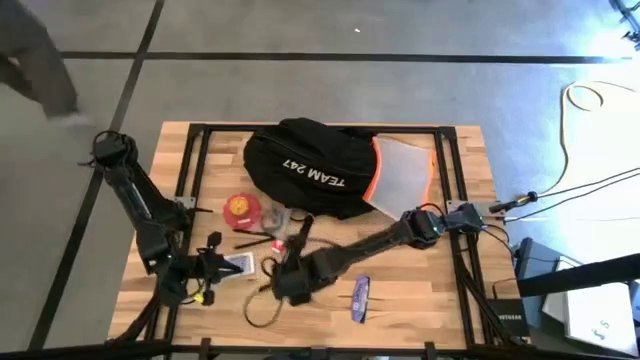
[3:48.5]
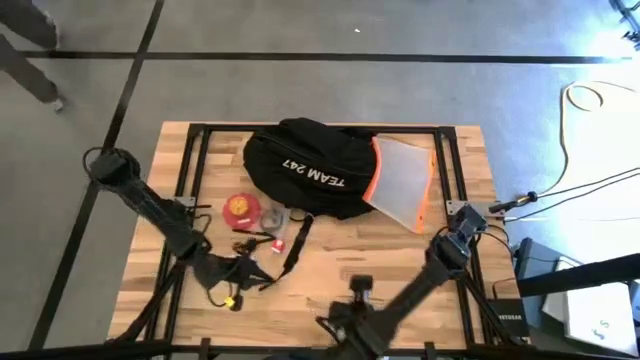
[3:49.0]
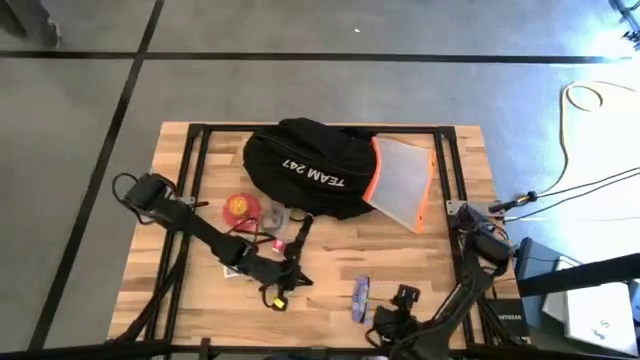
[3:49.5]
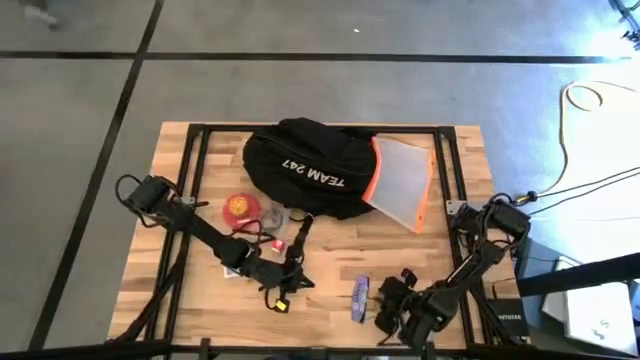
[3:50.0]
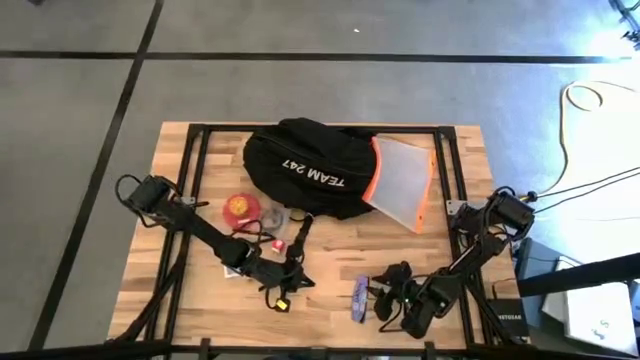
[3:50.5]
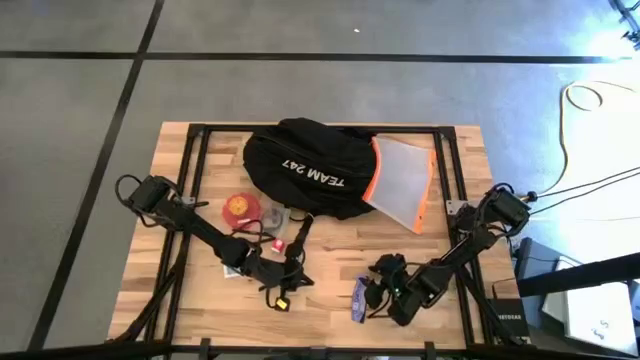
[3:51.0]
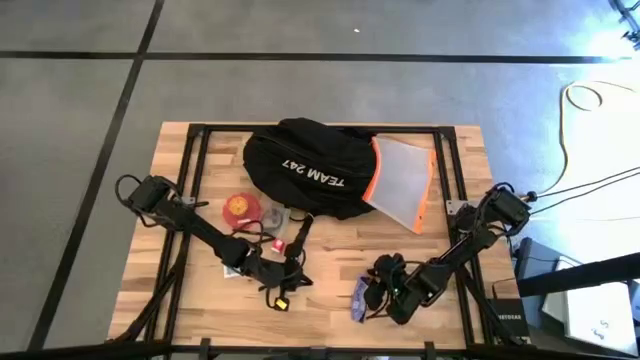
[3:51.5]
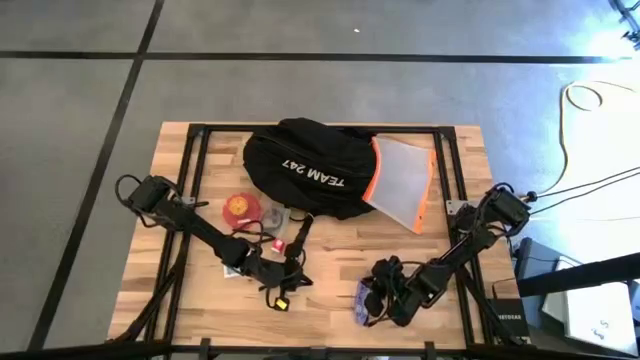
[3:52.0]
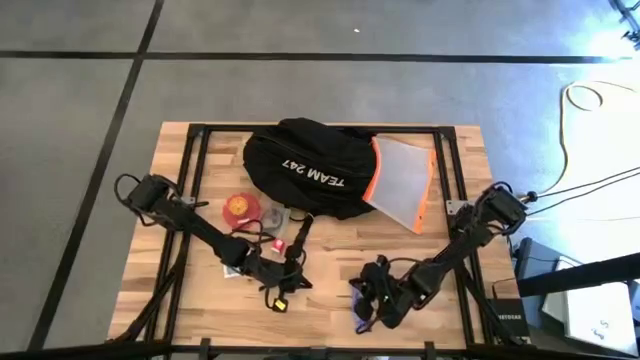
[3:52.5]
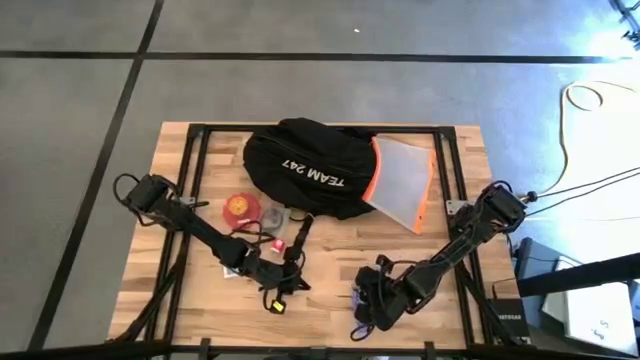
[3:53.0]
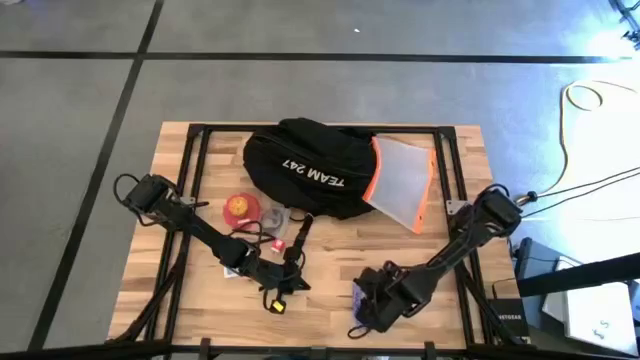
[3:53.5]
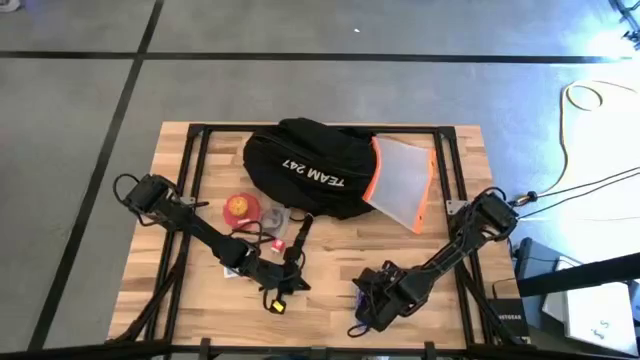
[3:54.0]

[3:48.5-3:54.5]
Task: Unpack backpack
Move the blue chocolate bar to the center of the table

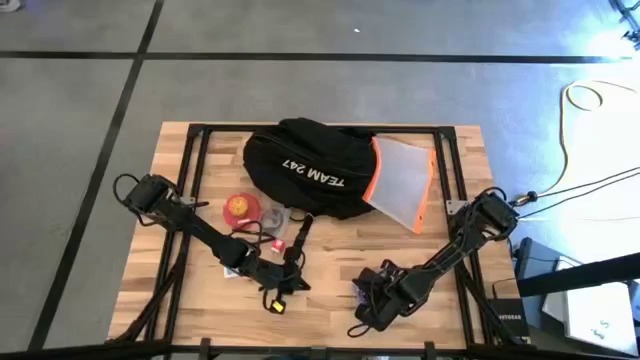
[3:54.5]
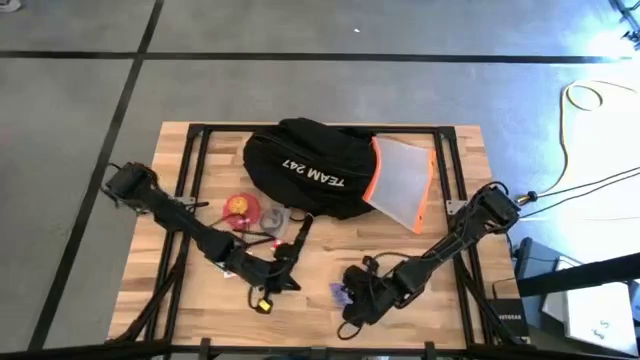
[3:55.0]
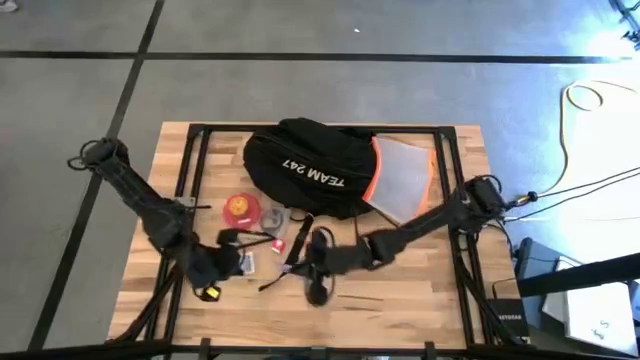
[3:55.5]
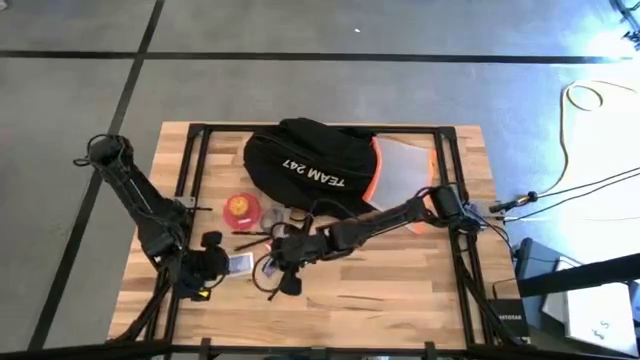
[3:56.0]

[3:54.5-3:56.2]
Move the blue chocolate bar to the center of the table

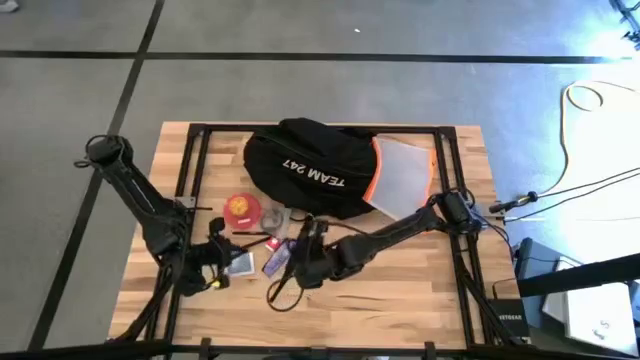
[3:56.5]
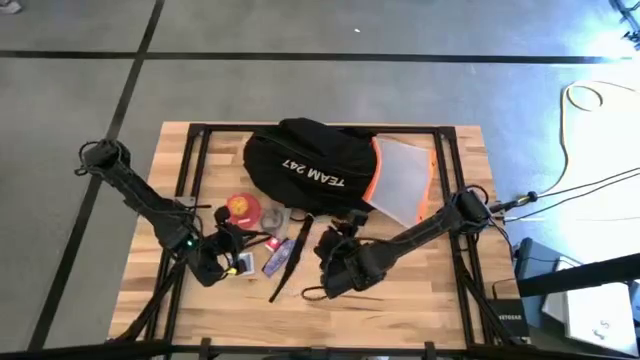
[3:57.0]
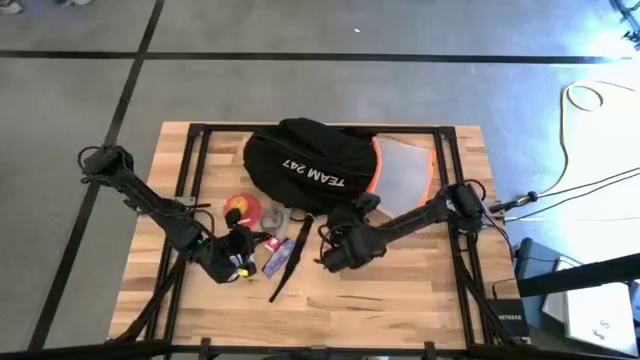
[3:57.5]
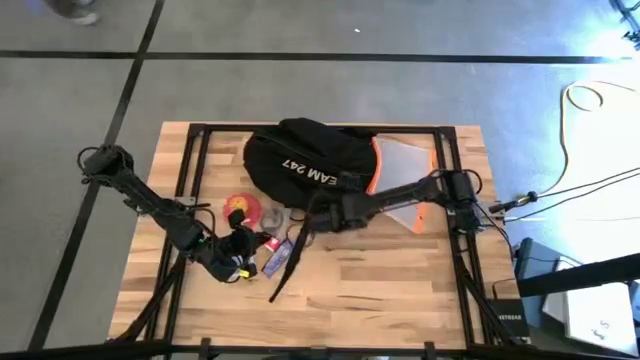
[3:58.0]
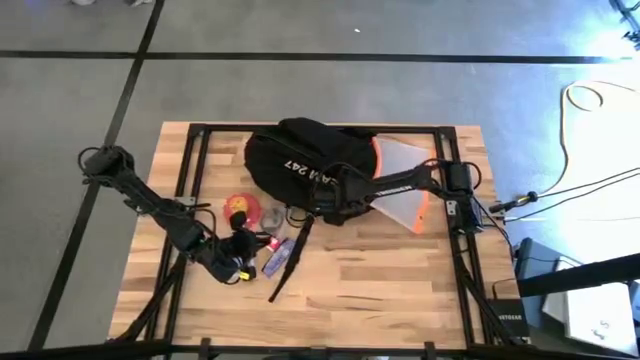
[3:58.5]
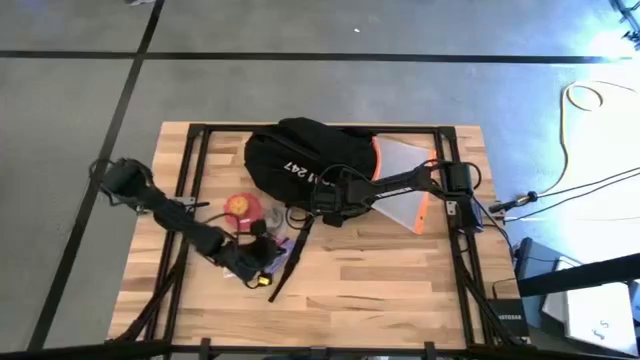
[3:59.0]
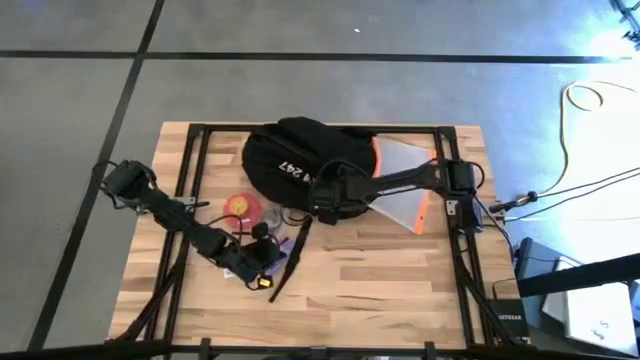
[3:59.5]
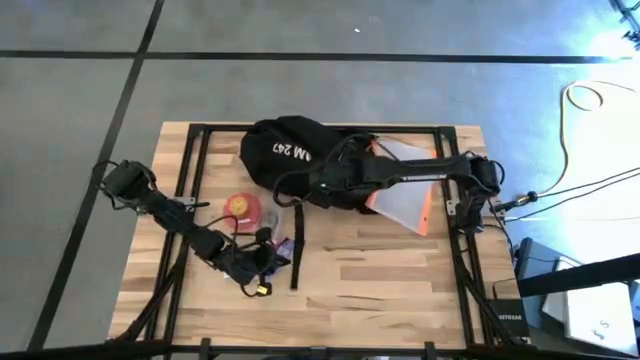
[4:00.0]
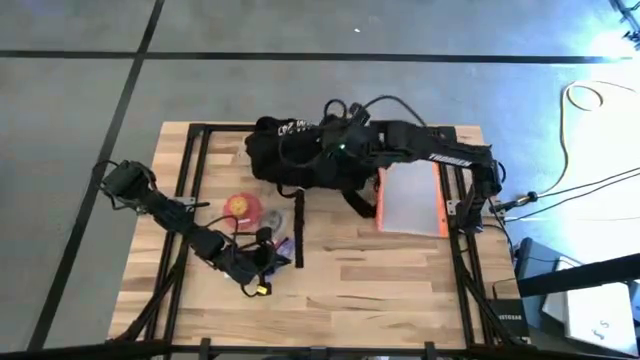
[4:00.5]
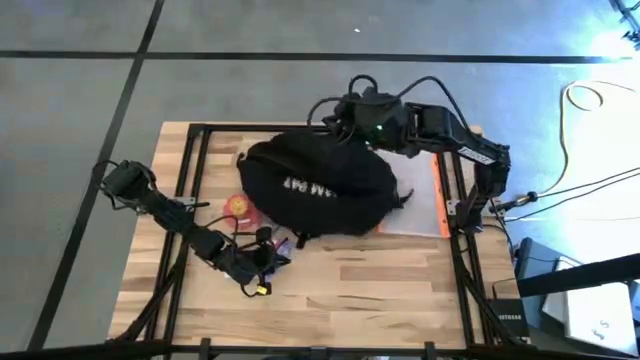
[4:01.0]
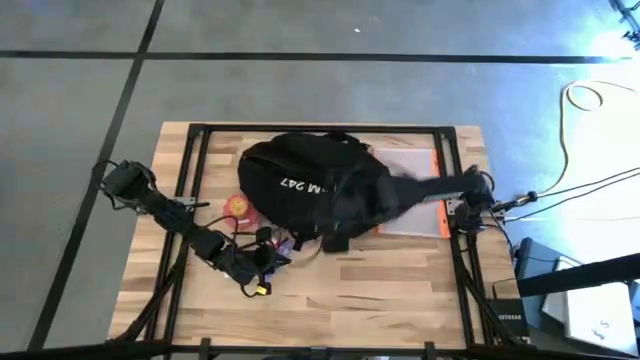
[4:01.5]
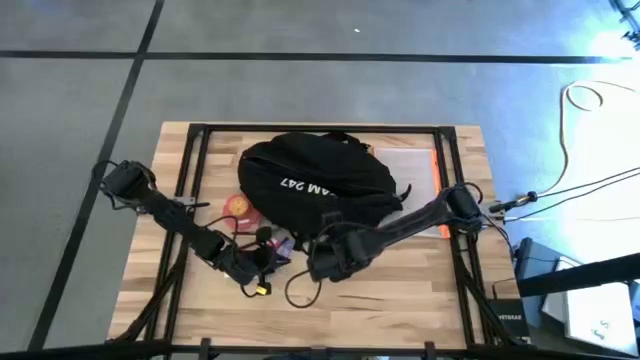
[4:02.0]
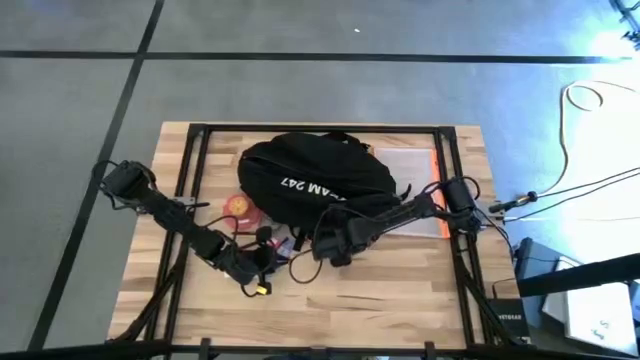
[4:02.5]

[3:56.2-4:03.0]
Move the black backpack to the center of the table

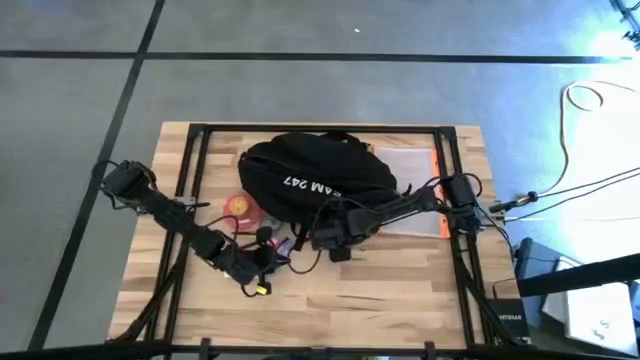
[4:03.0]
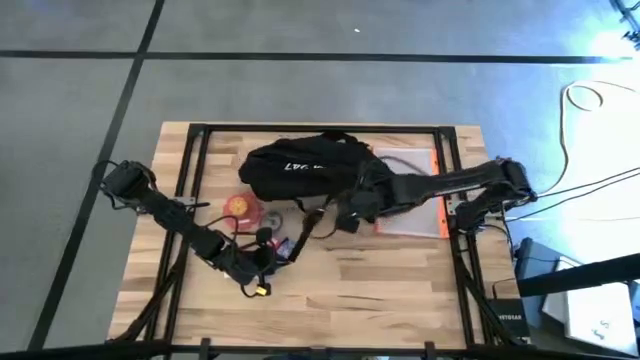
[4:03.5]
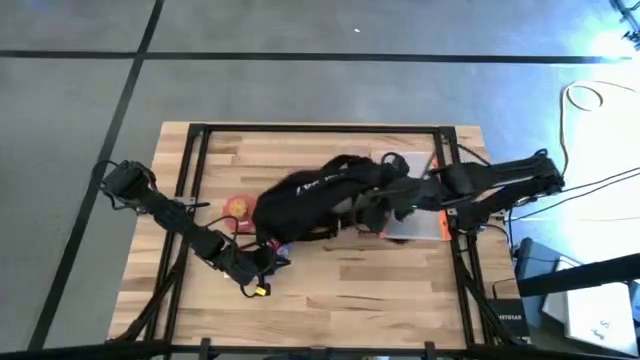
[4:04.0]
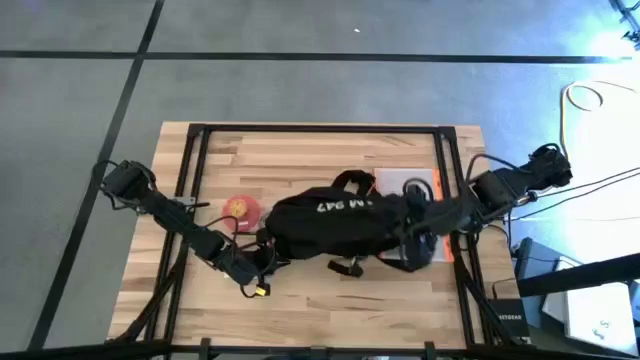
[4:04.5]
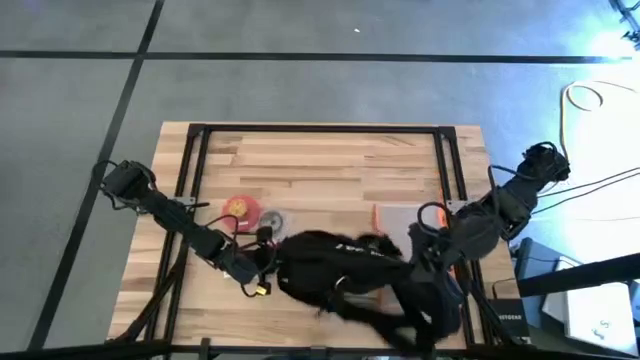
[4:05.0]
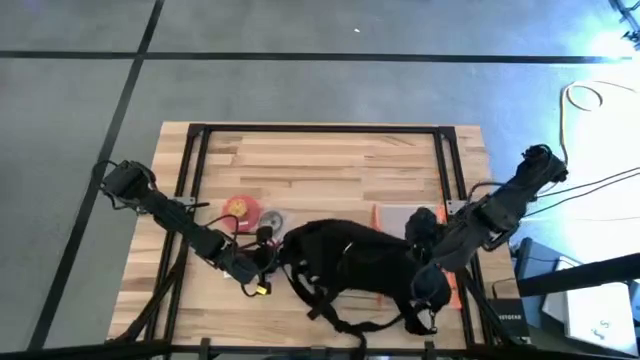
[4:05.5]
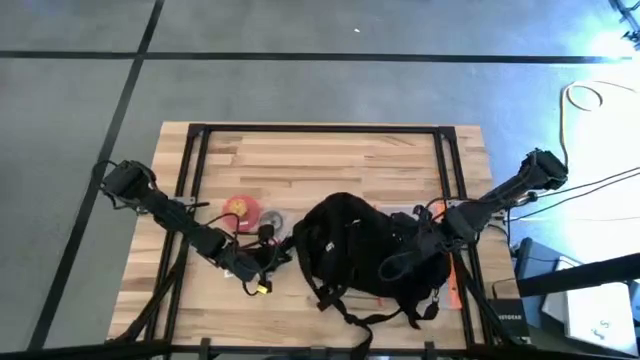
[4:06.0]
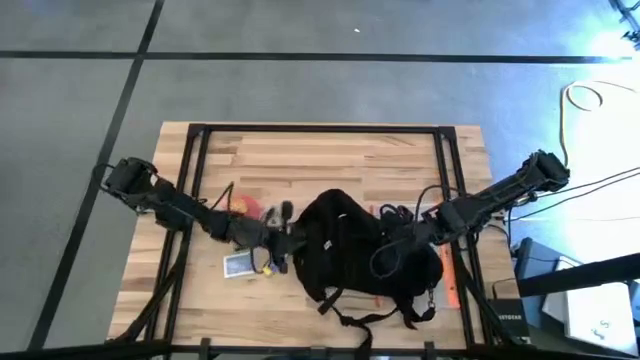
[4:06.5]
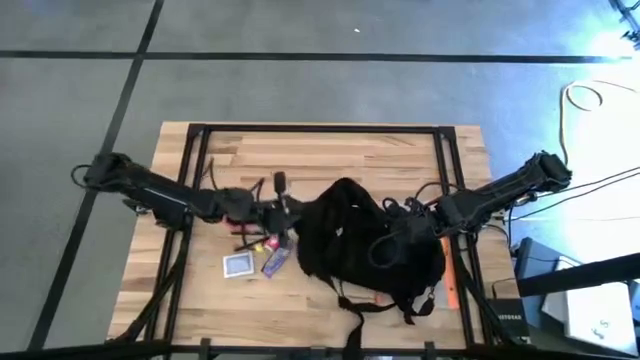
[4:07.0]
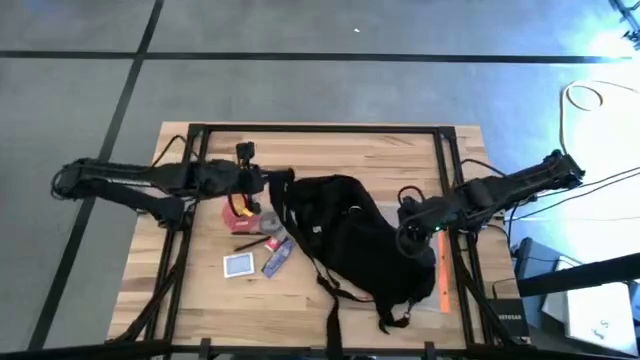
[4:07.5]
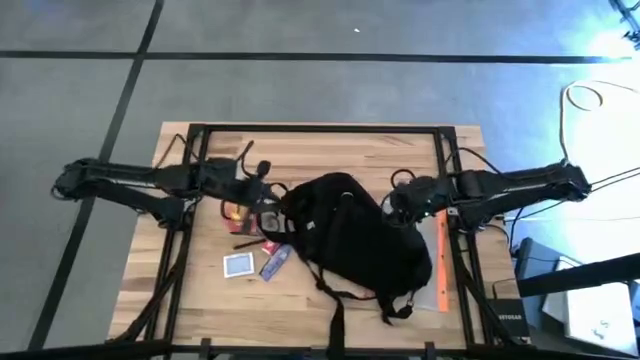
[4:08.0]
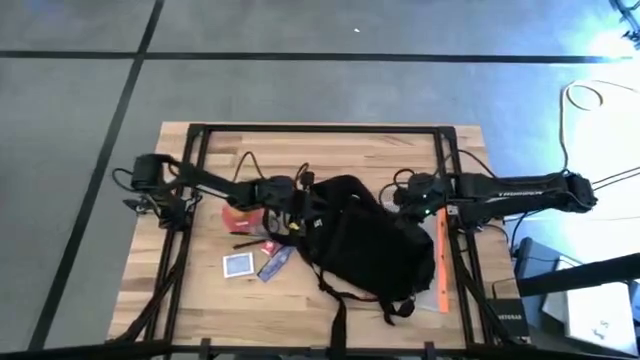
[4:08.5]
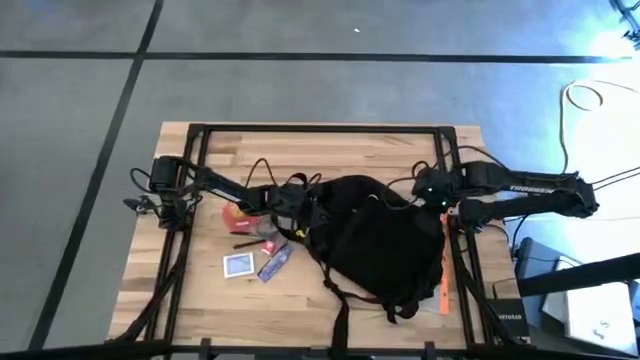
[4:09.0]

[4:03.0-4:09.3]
Move the black backpack to the center of the table

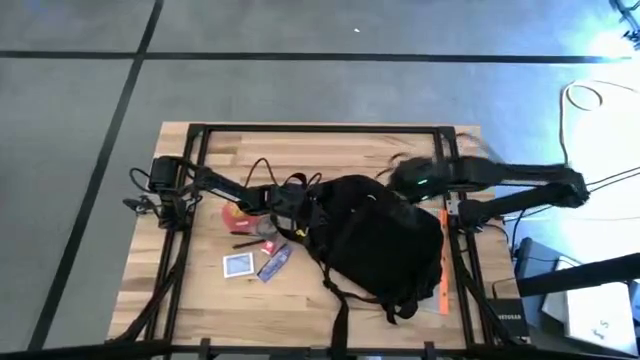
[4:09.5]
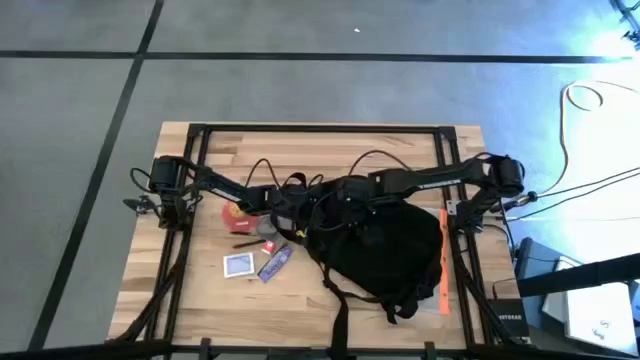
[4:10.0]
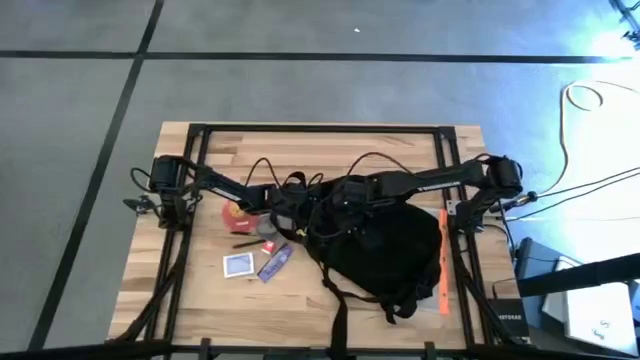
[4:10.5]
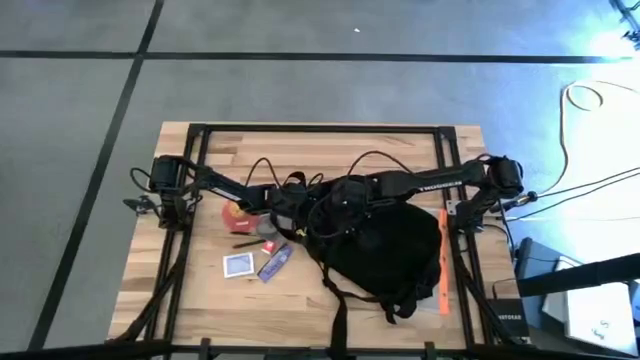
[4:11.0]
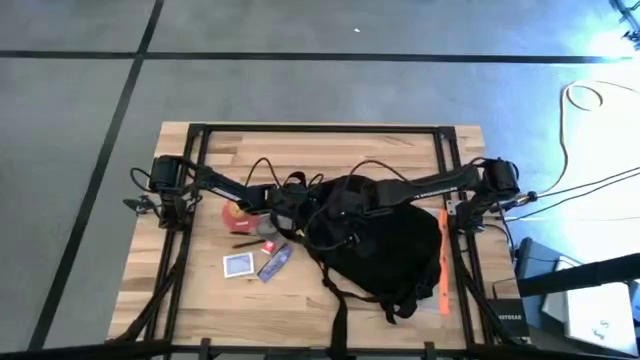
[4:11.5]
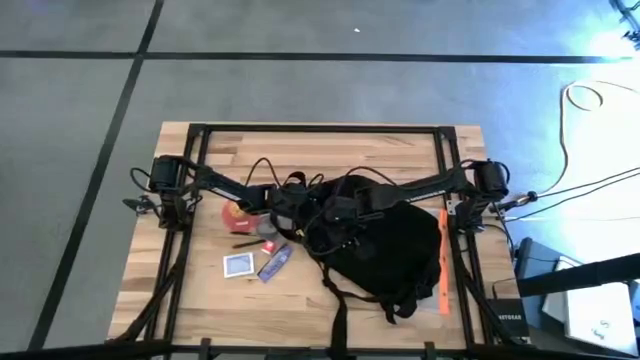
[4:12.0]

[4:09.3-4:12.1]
Open the black backpack
